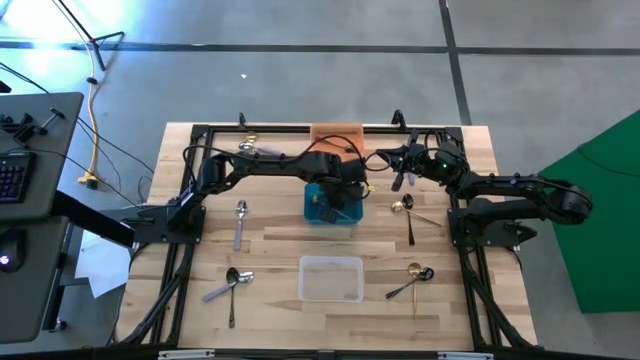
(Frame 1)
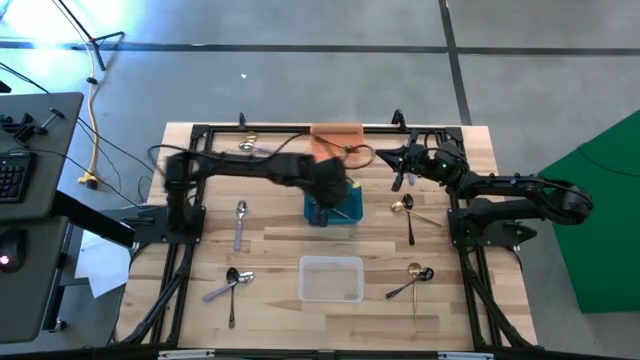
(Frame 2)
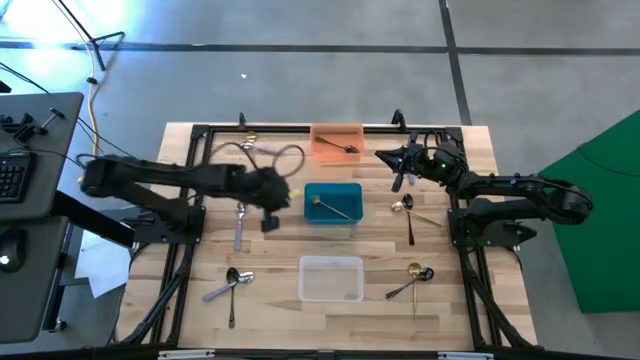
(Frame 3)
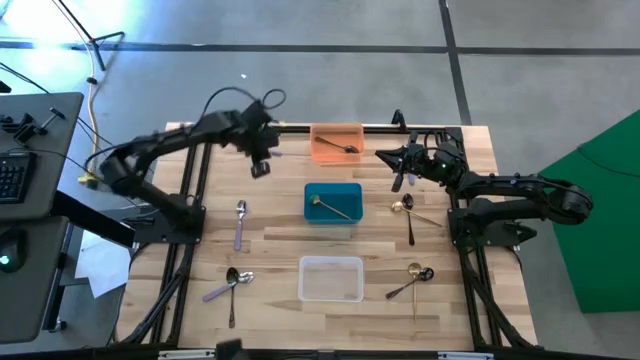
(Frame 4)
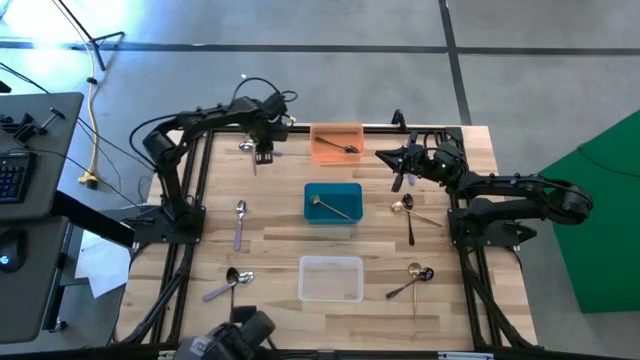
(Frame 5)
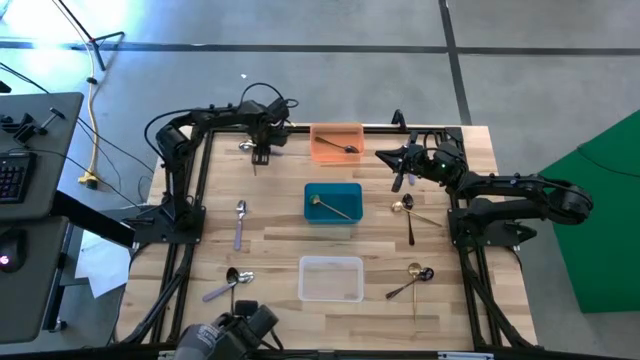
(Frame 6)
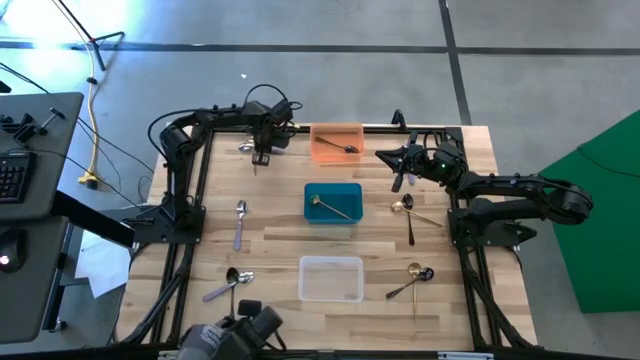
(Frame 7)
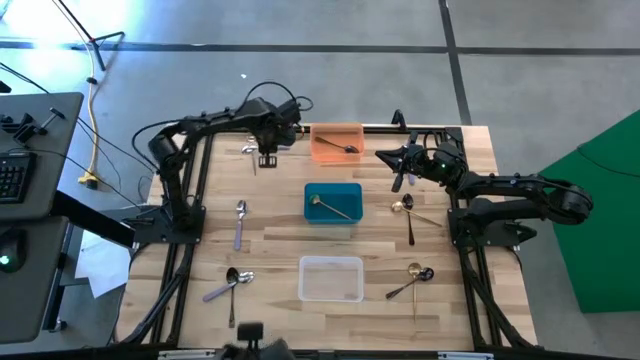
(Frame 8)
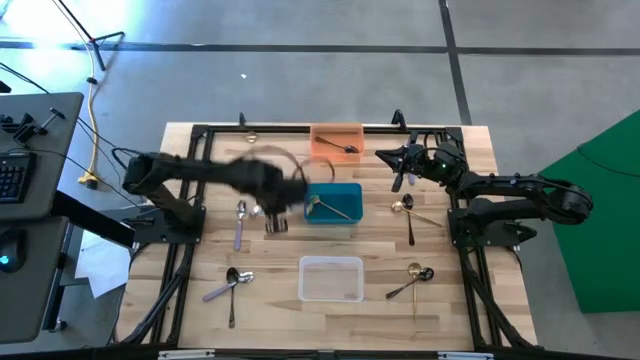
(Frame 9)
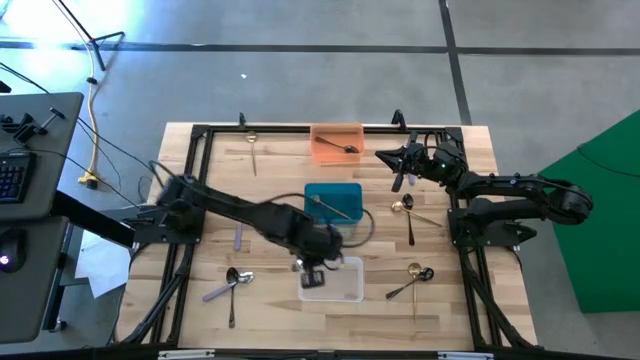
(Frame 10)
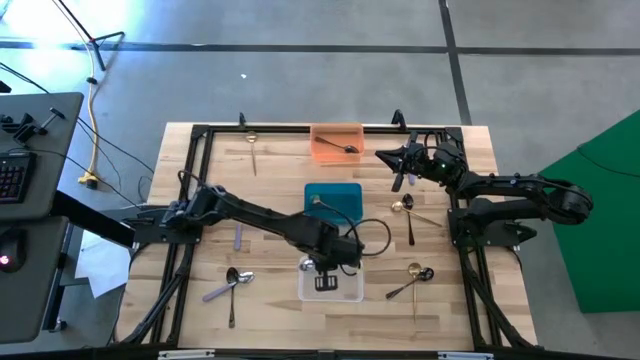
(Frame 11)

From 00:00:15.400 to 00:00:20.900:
Task: Sort silverware by color (type)
Put the purple spoon into the transparent bin

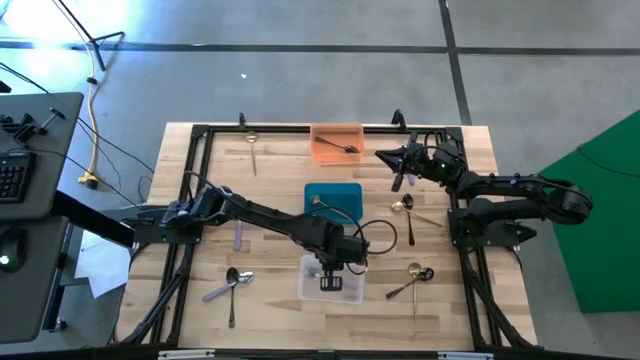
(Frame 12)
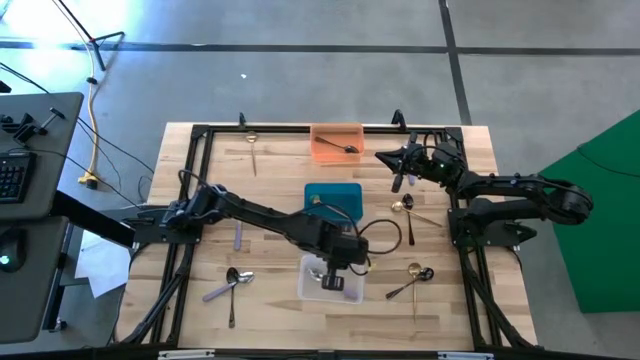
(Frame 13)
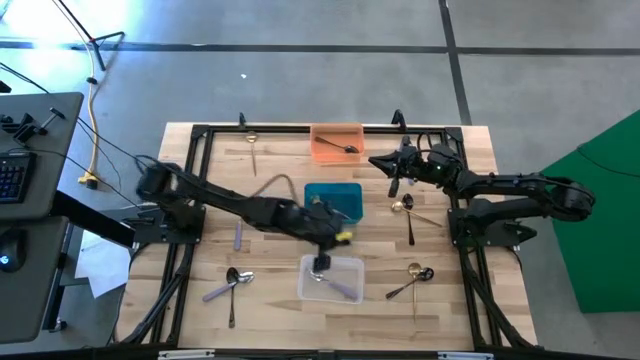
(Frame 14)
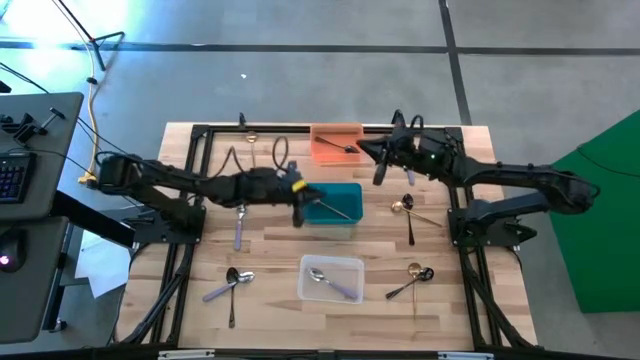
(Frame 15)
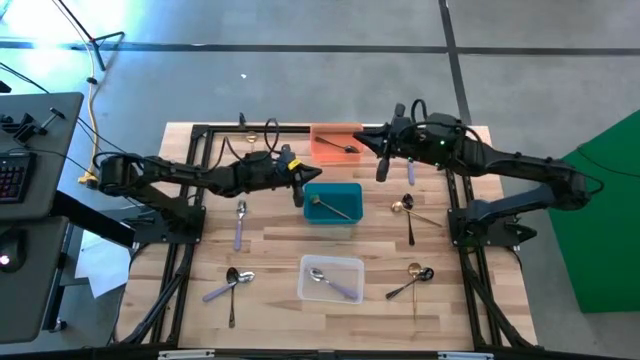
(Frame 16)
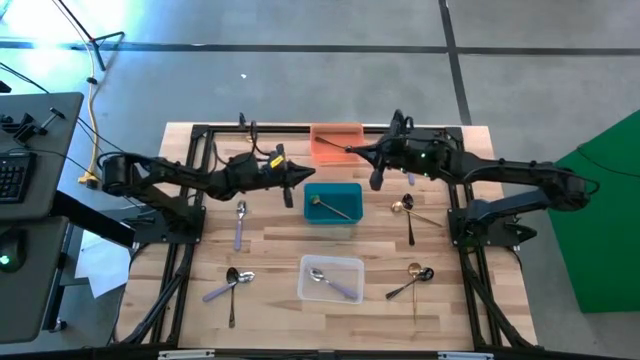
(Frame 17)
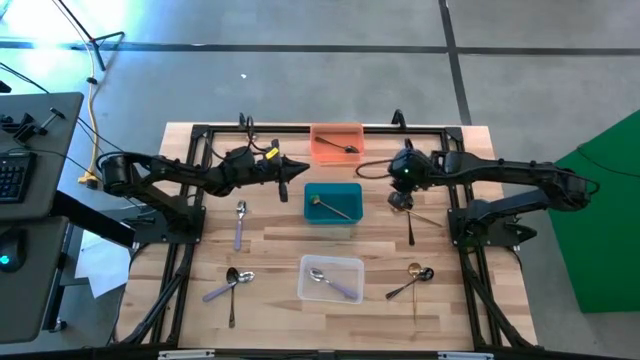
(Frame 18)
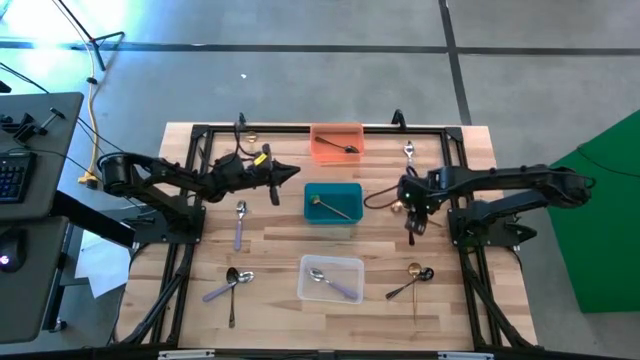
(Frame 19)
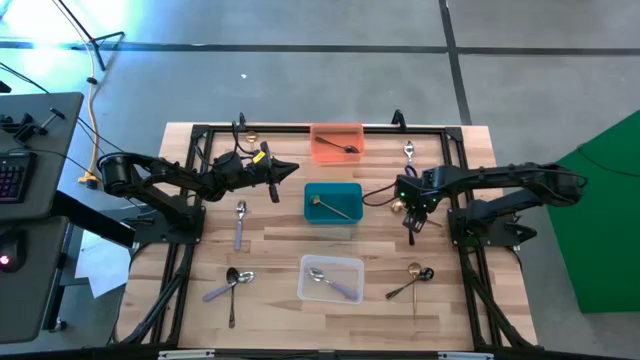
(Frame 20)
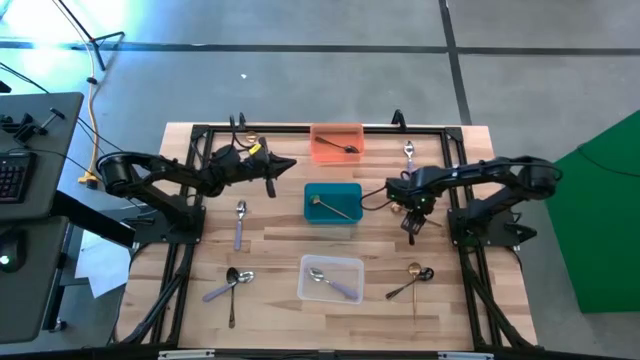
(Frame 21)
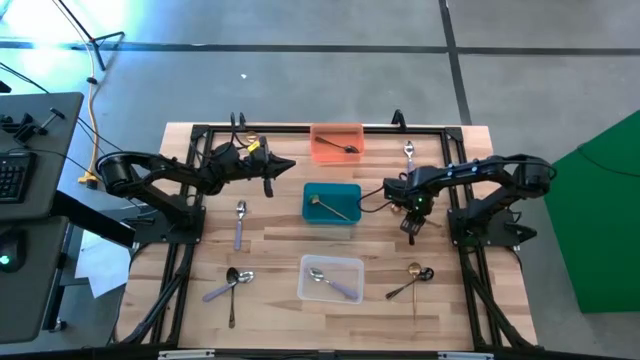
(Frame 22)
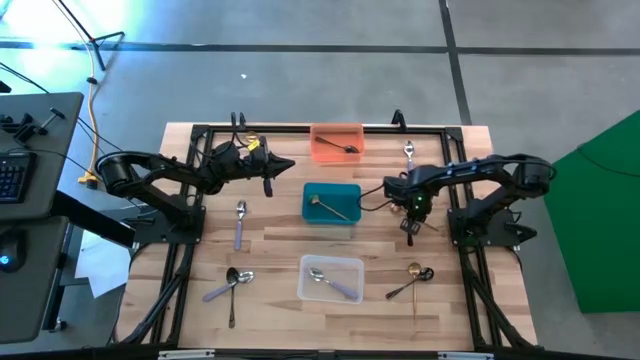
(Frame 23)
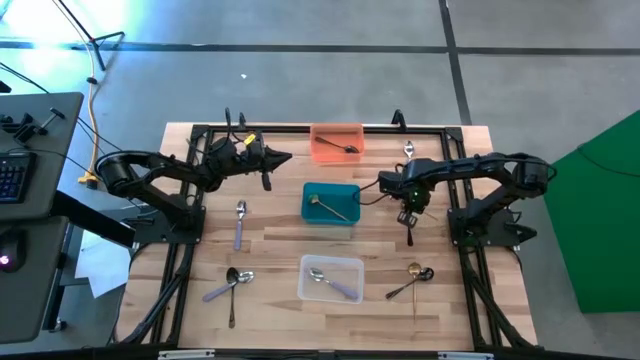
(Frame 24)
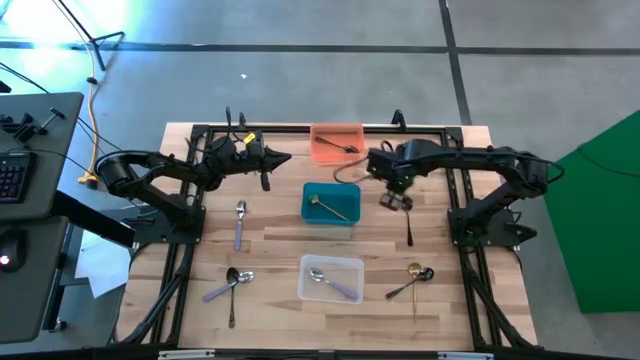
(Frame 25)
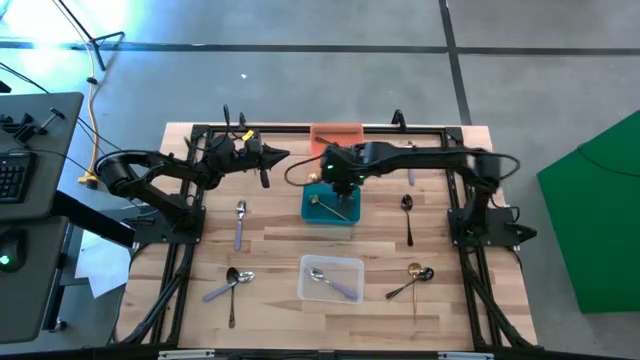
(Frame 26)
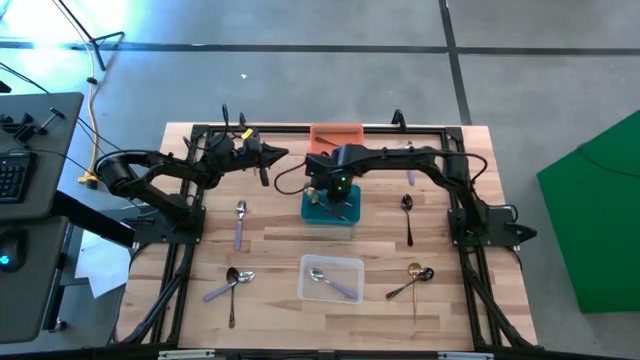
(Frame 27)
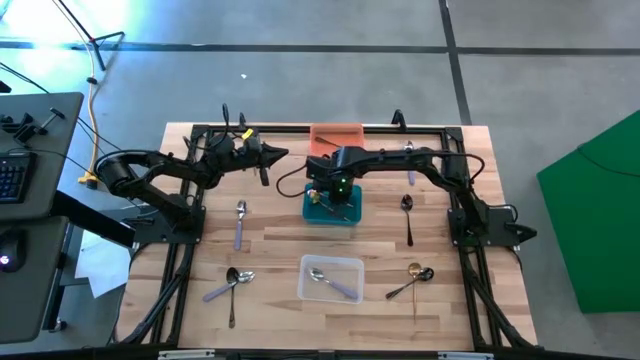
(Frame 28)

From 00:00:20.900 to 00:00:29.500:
Put the gold spoon into the dark green bin

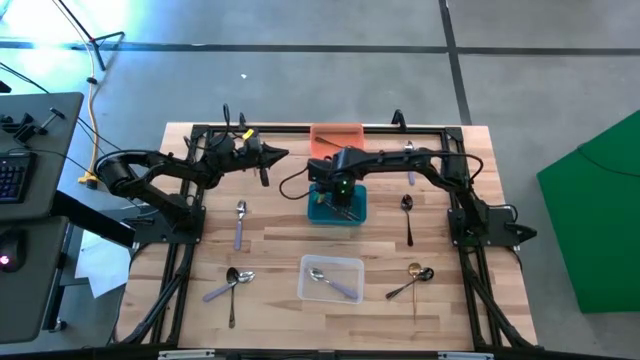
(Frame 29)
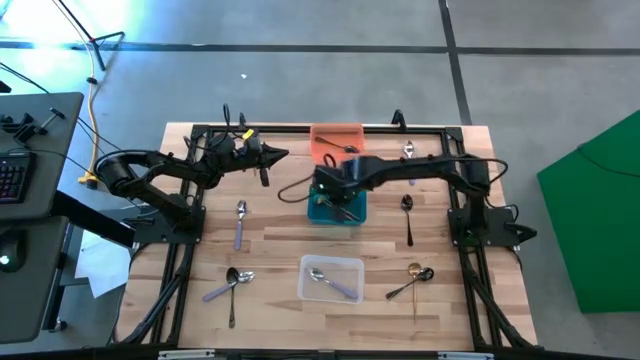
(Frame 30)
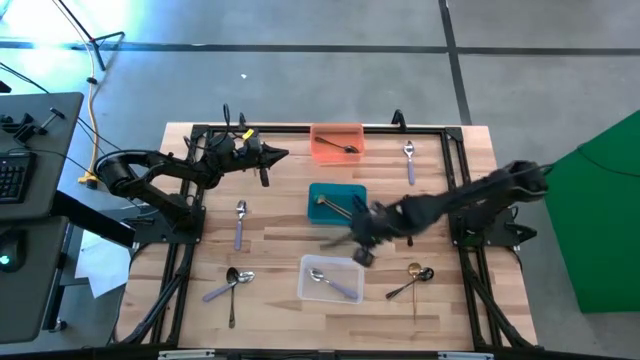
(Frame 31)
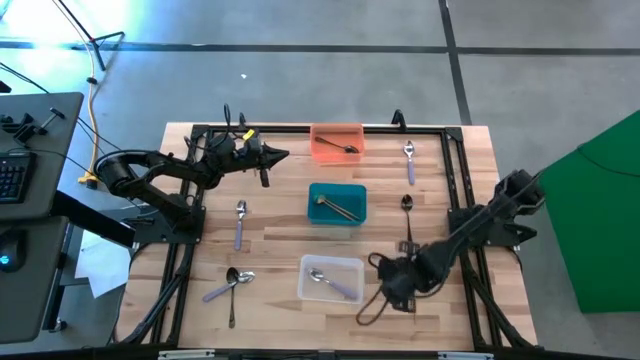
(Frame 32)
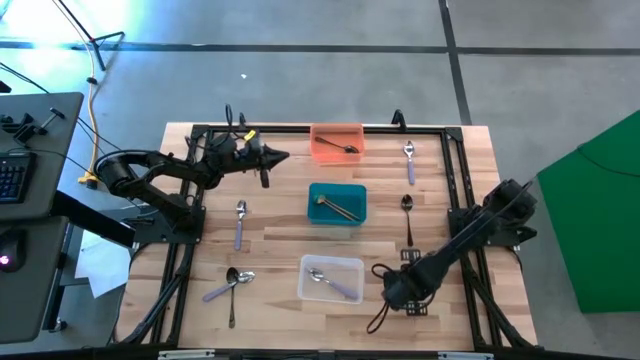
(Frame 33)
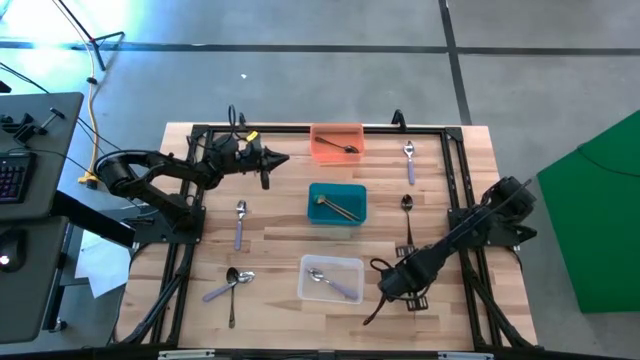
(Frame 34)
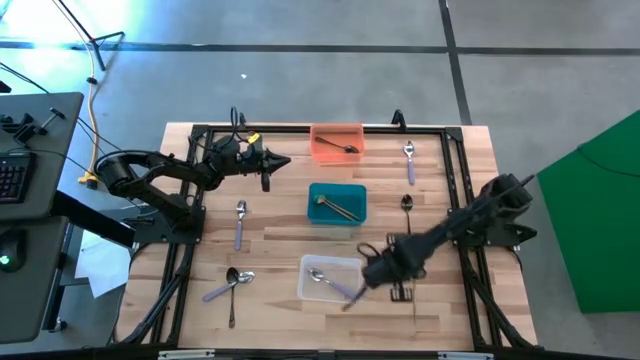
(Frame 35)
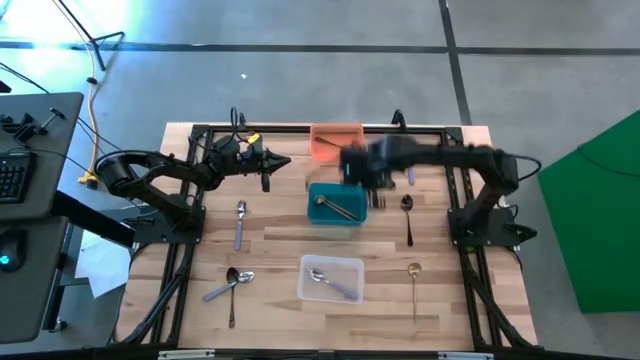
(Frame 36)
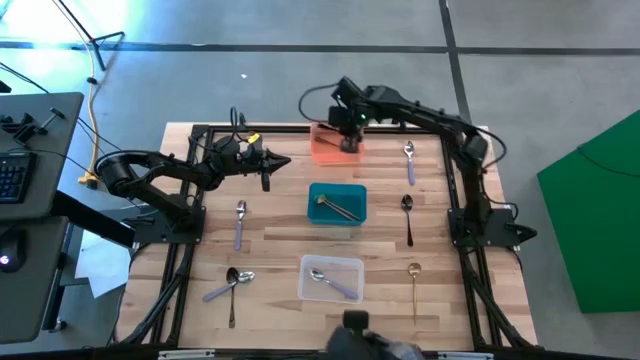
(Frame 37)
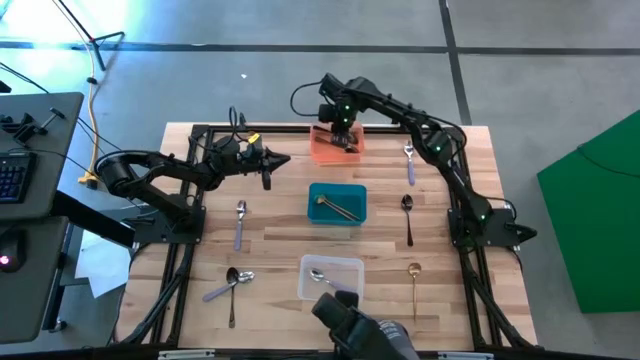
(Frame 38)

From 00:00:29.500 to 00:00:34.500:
Put the black spoon into the orange bin

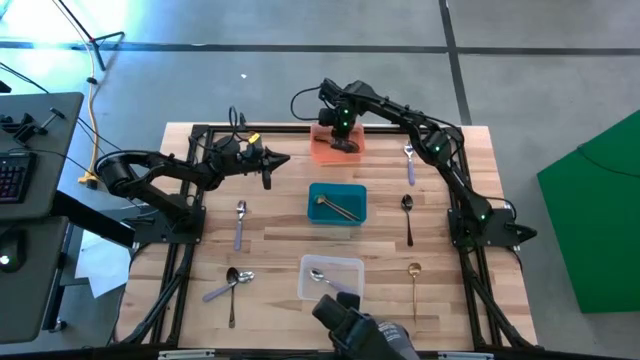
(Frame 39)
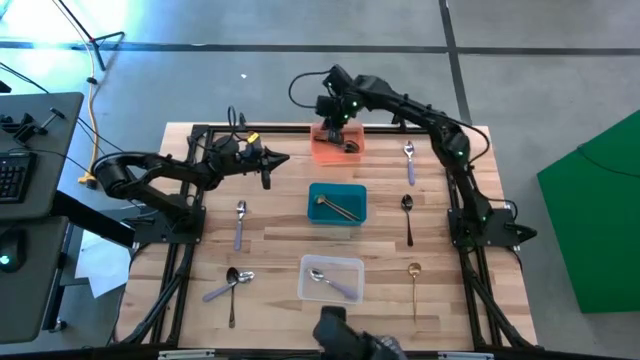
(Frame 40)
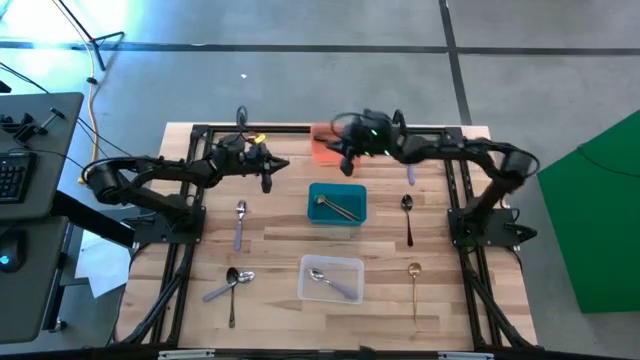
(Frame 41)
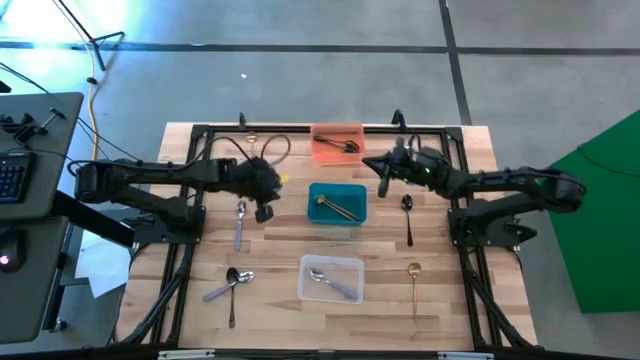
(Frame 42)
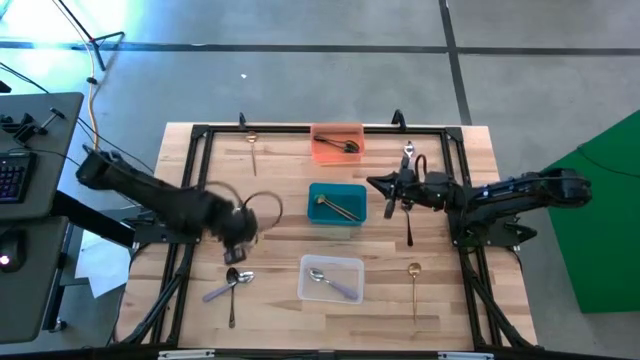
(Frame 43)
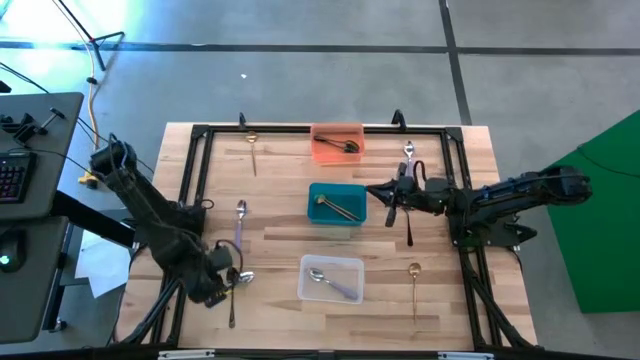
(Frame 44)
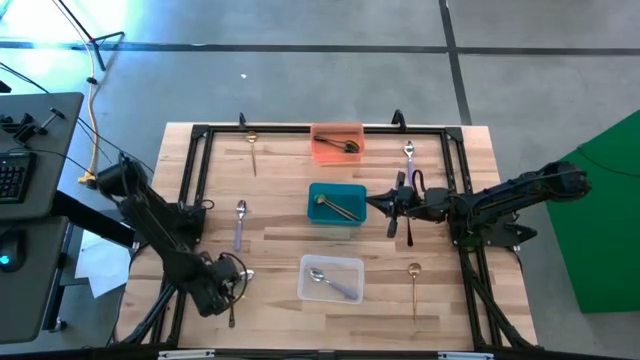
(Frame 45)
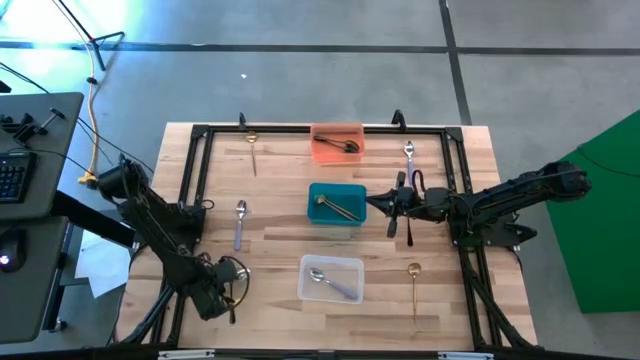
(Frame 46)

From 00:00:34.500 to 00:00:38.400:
Put the purple spoon into the transparent bin
